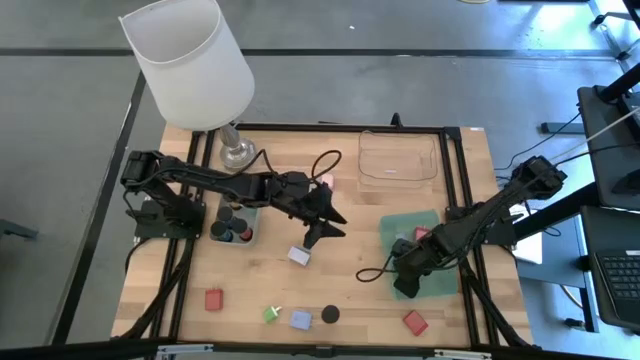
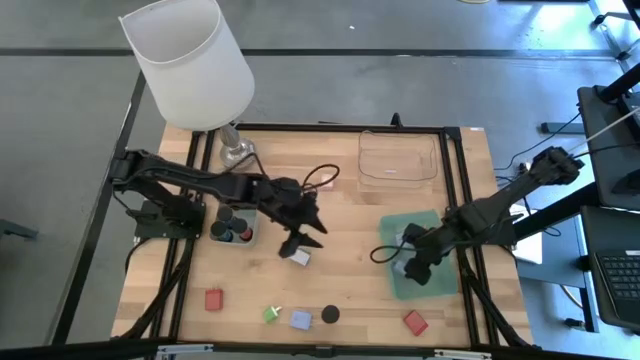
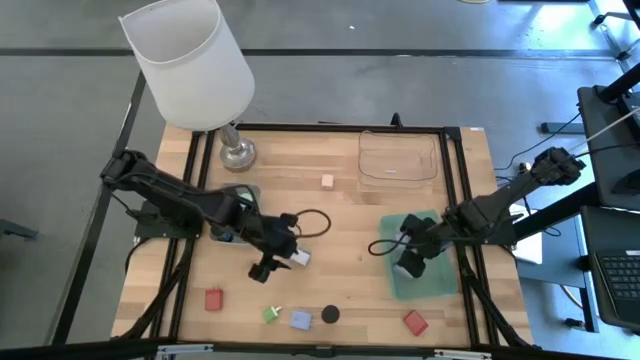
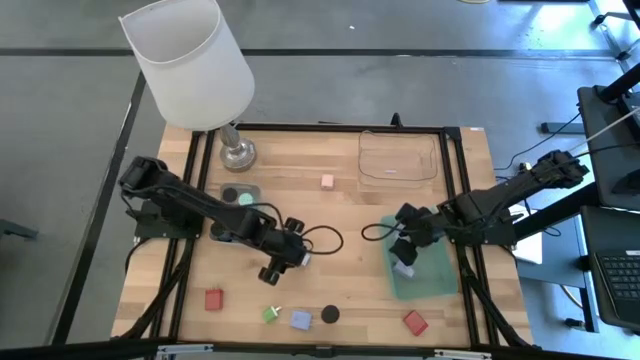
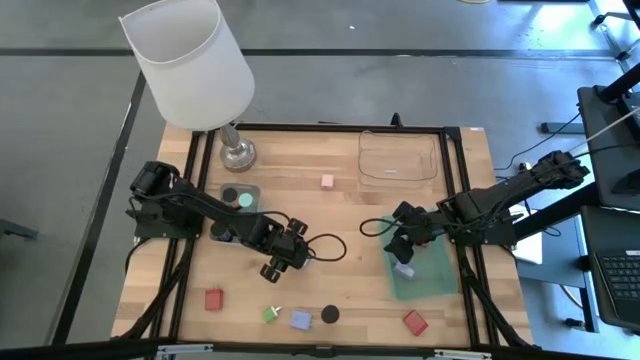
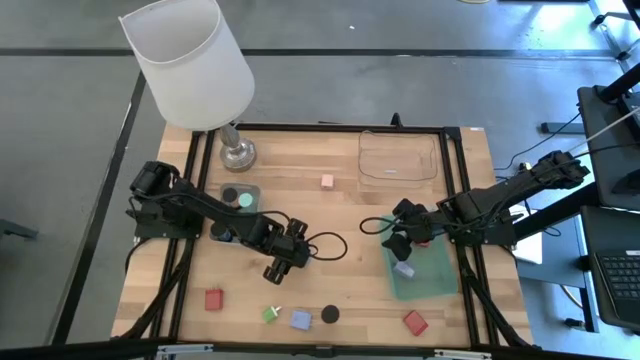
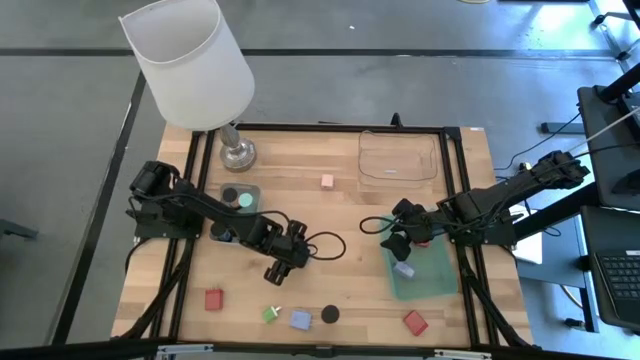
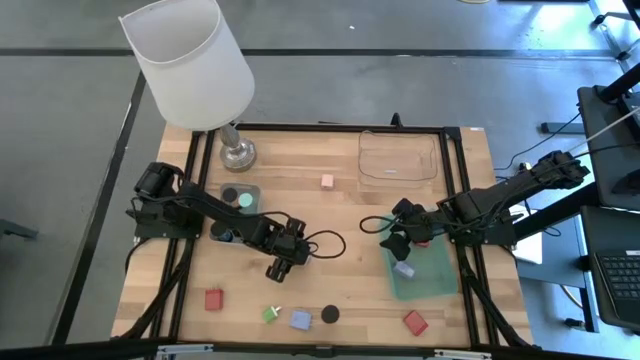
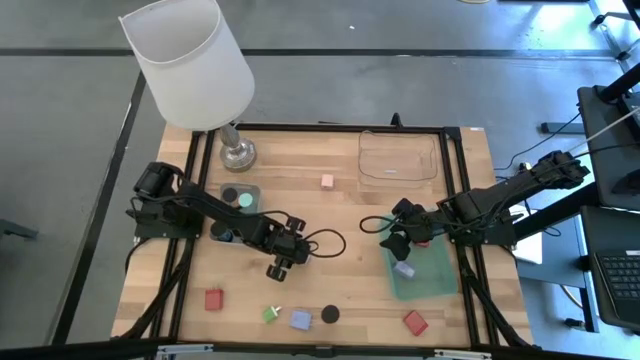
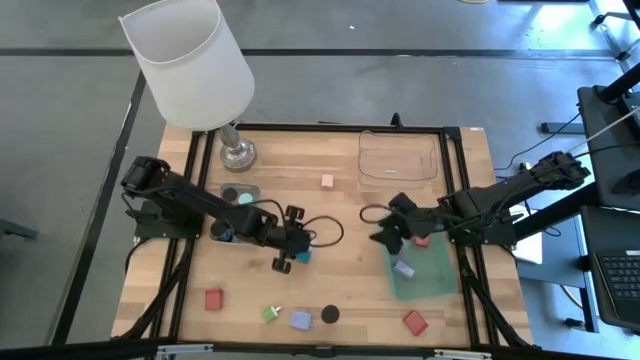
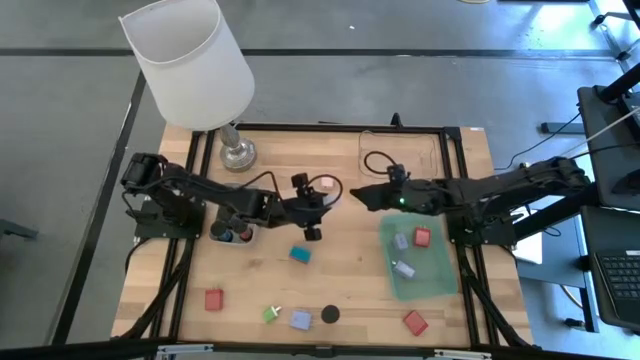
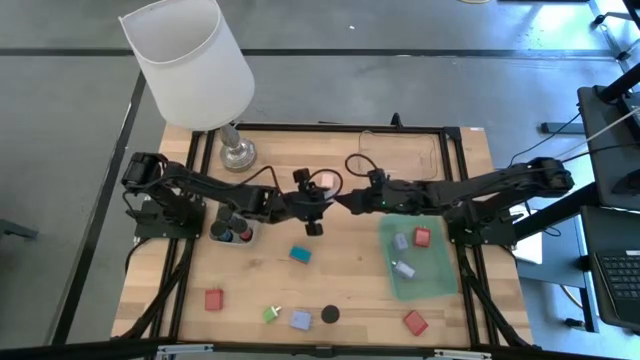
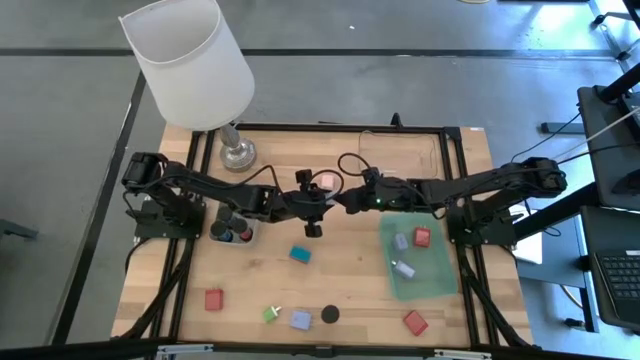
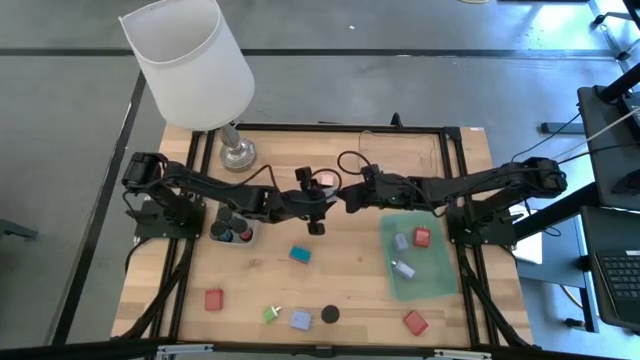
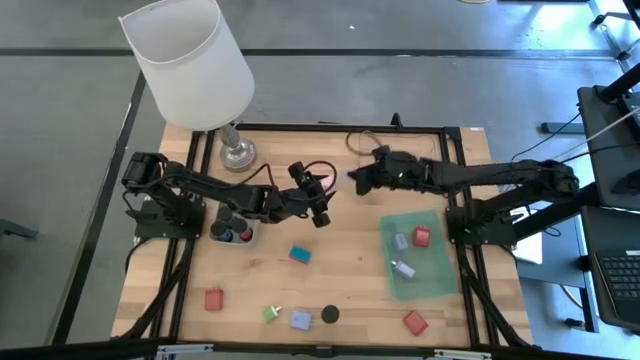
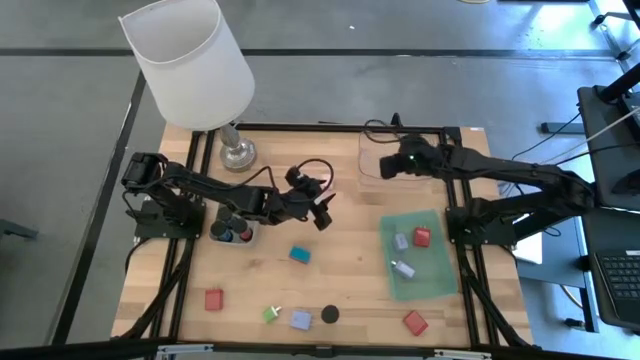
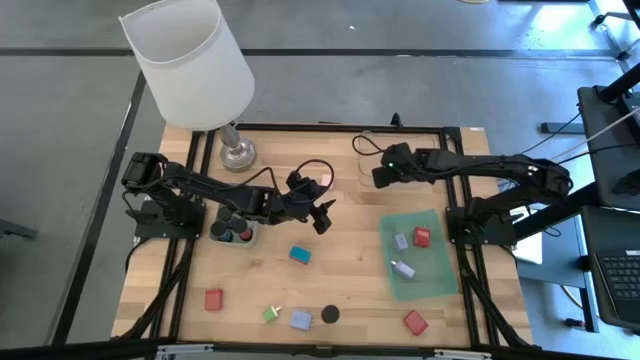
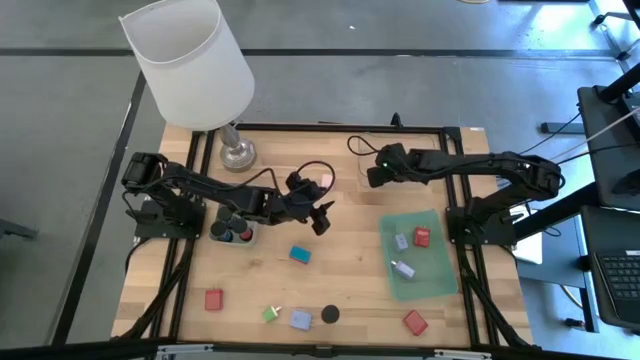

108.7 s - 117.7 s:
Task: Pick & Place Office items
Put the white digital timer into the transparent bin

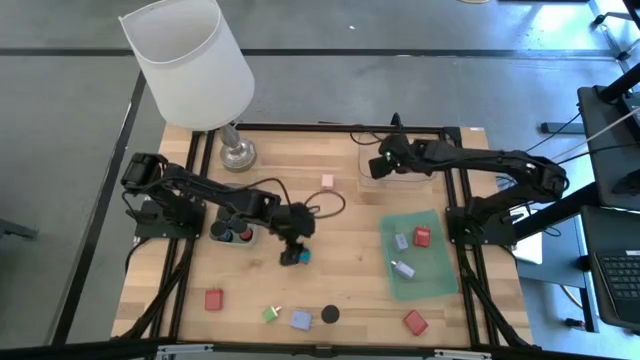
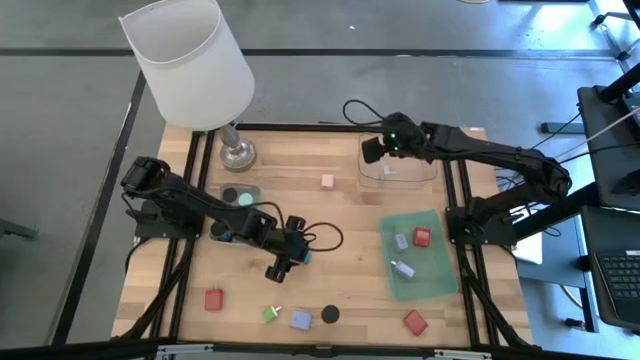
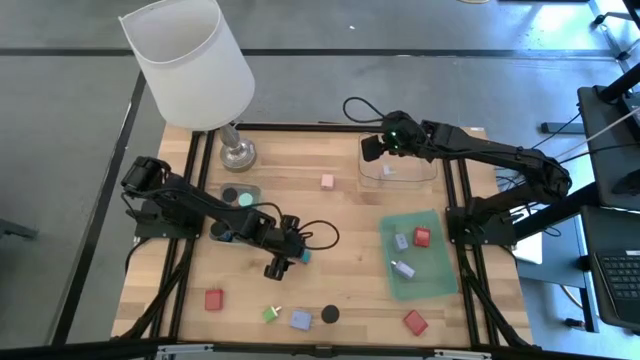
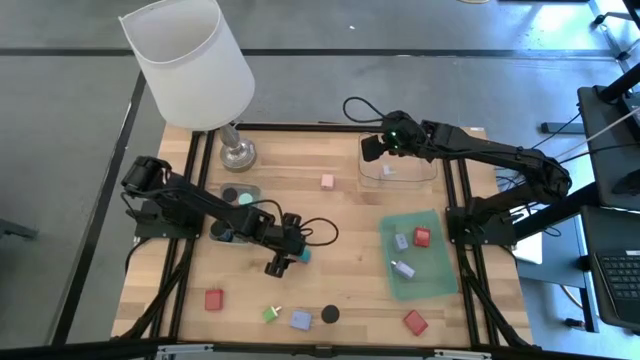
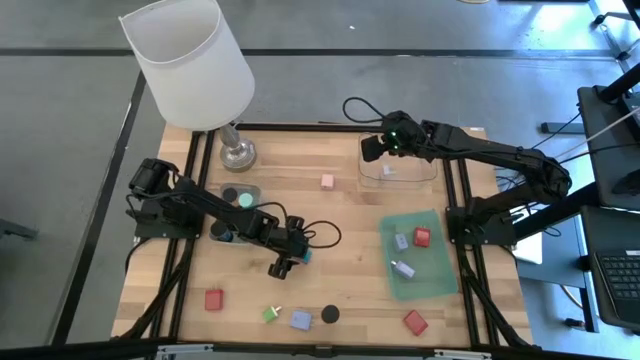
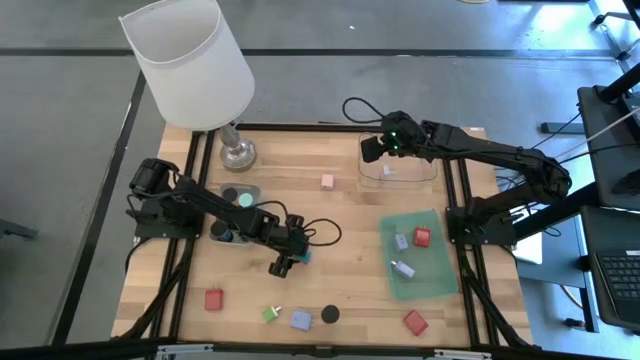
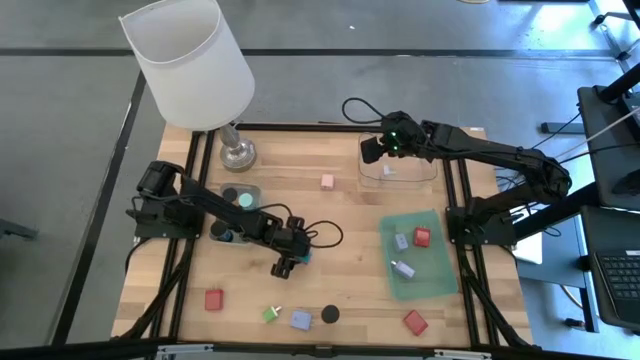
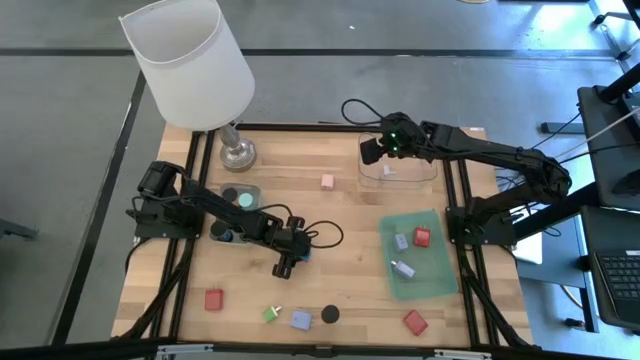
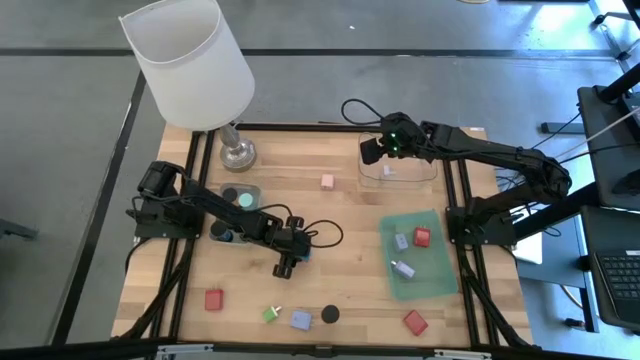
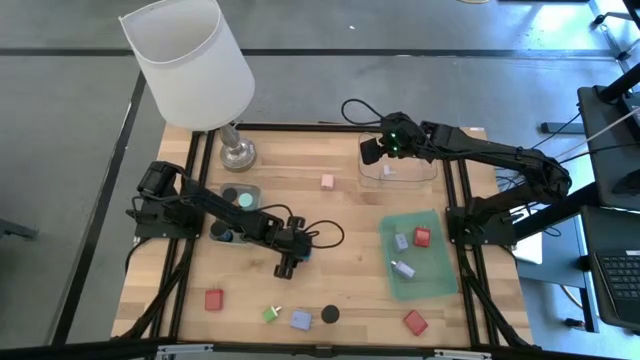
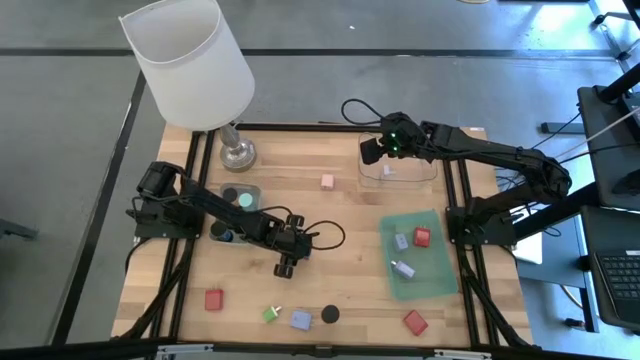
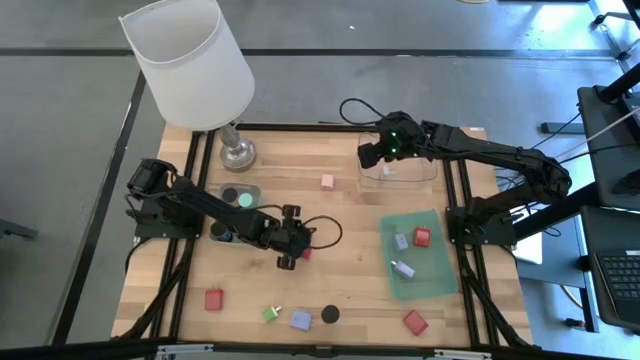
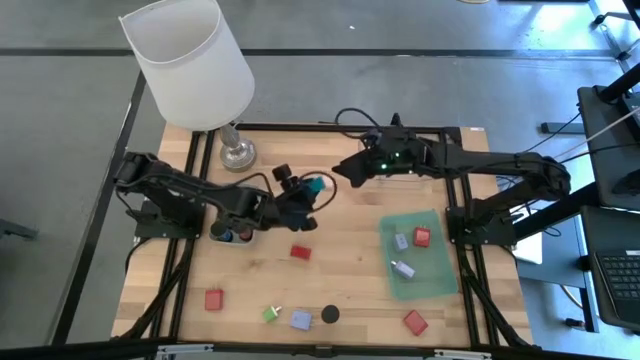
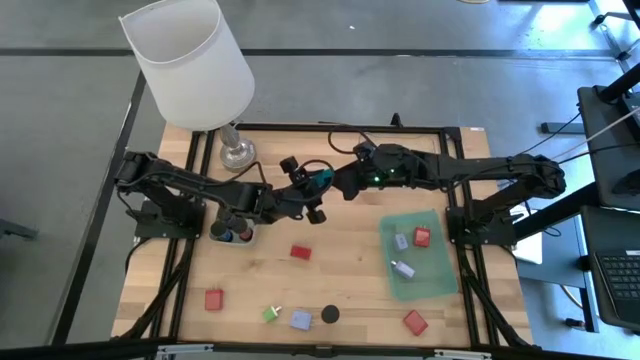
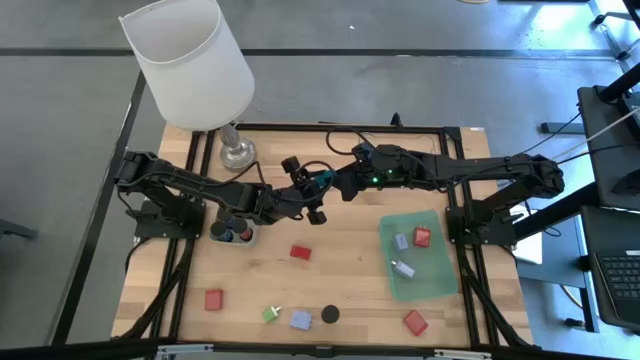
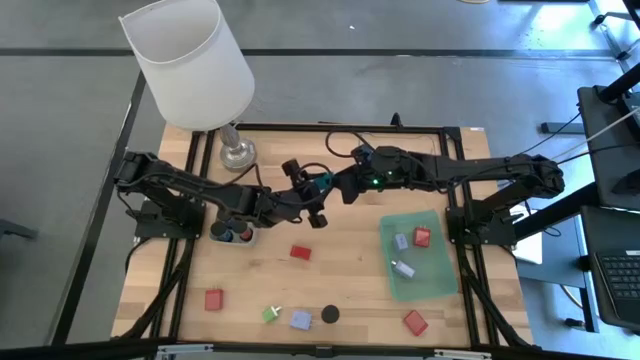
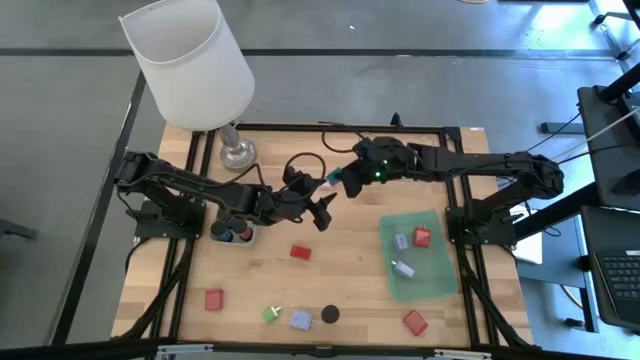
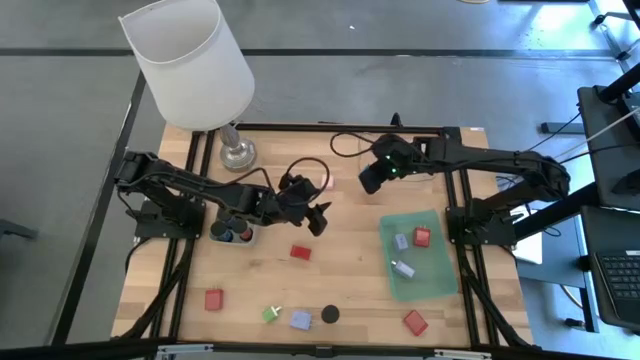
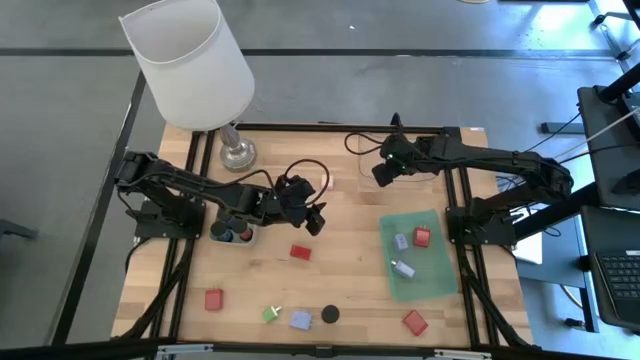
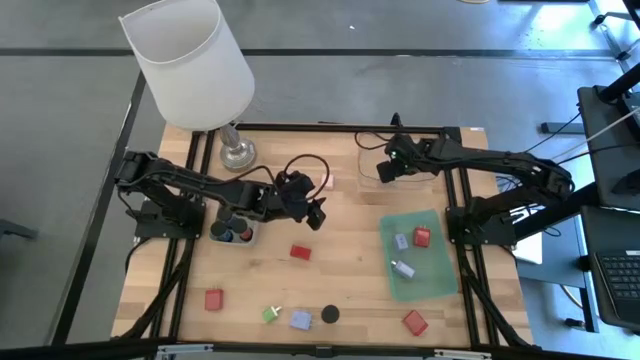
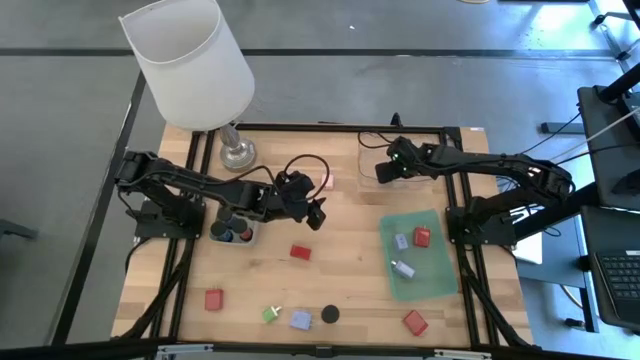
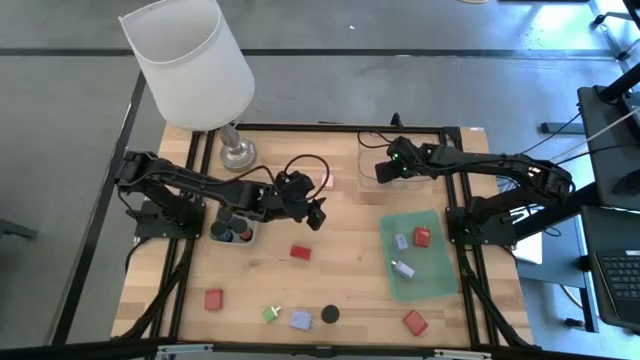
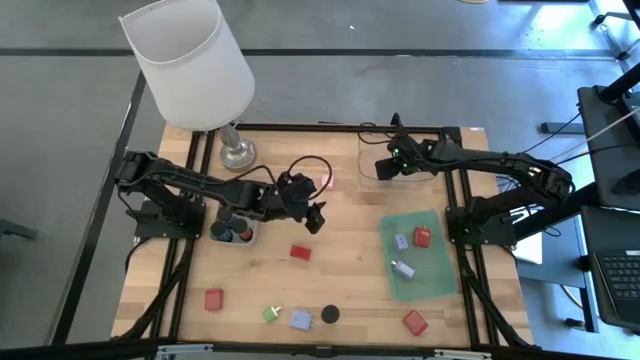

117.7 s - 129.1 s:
Put the blue digital timer into the transparent bin
